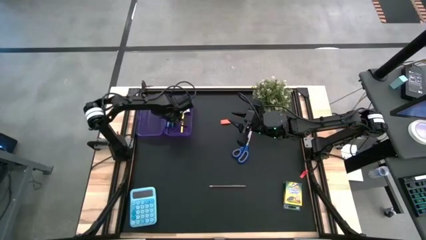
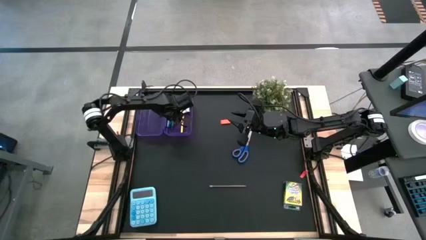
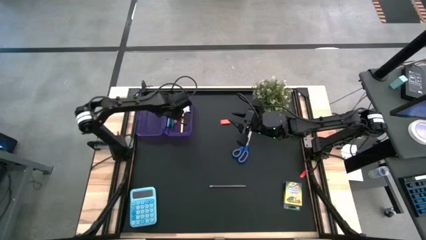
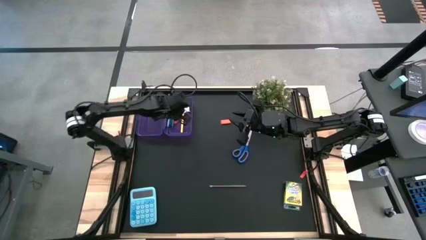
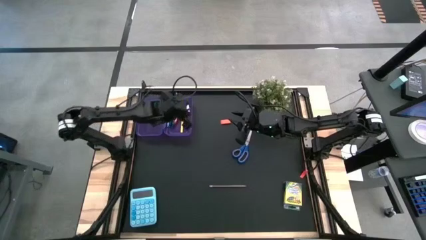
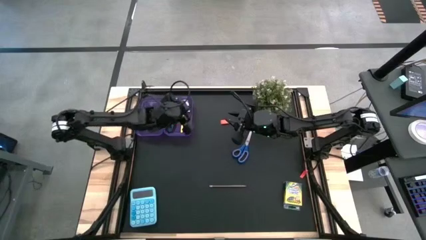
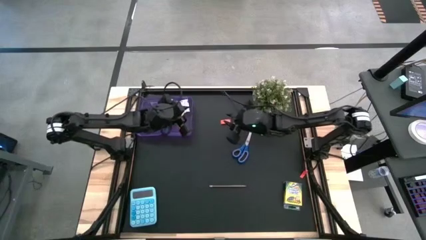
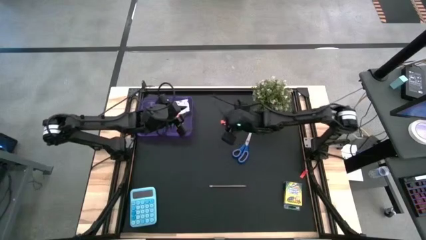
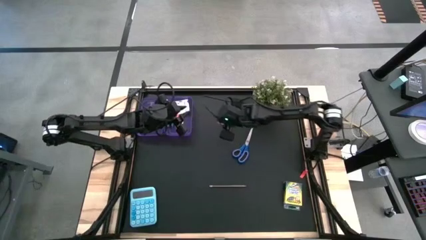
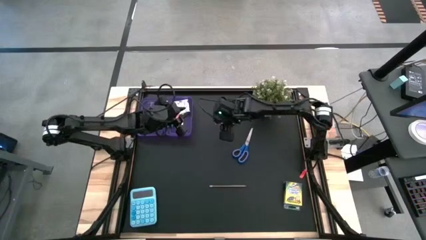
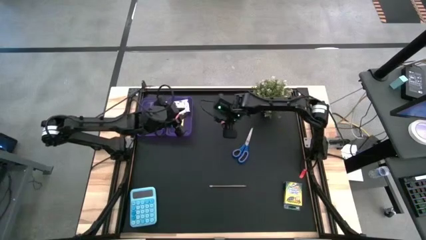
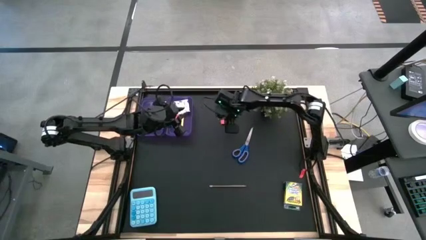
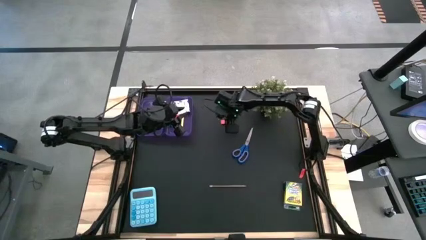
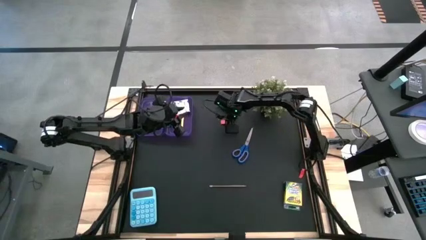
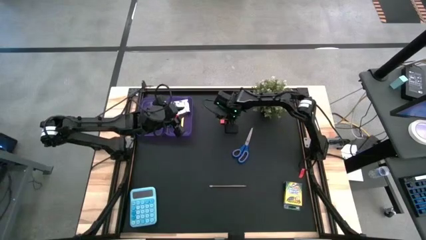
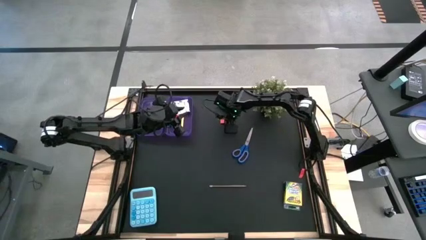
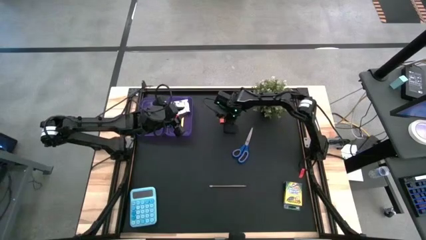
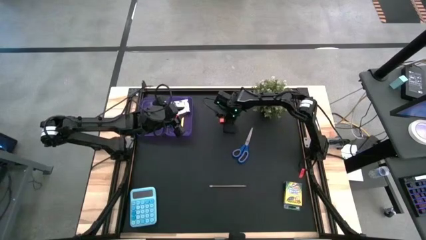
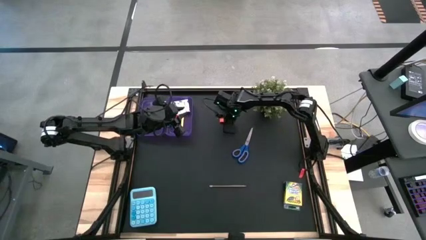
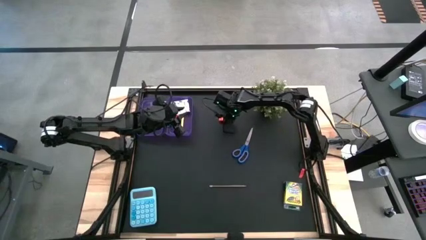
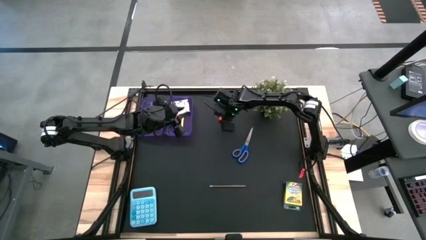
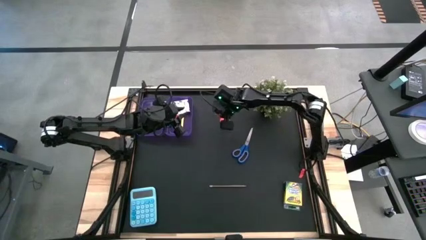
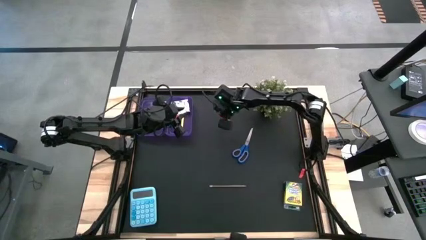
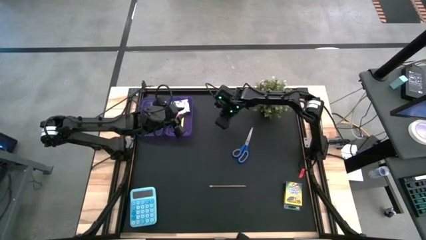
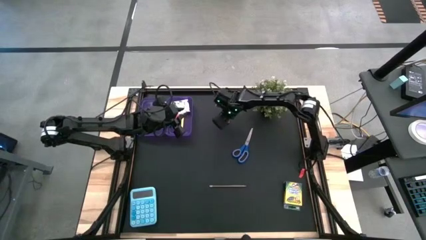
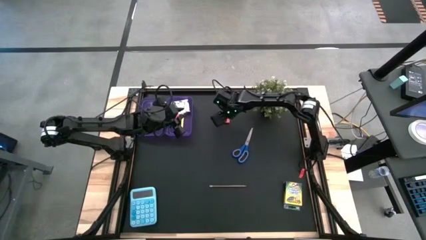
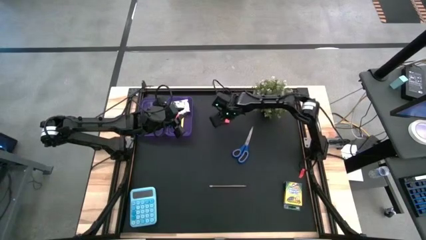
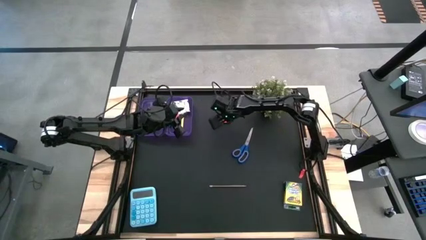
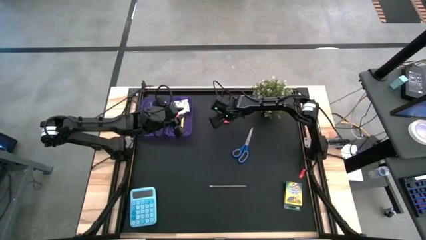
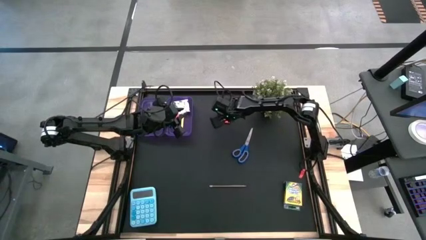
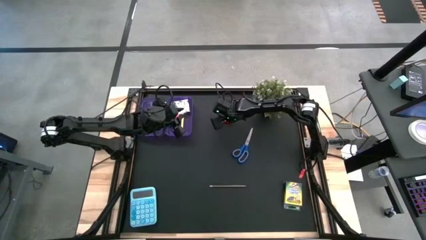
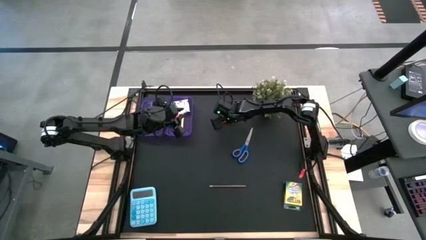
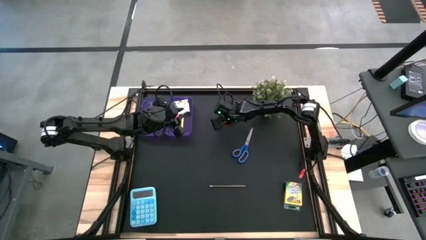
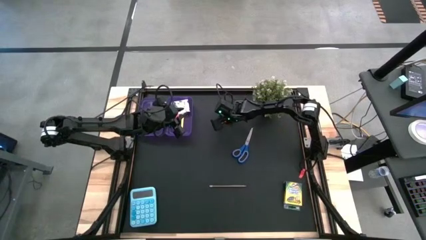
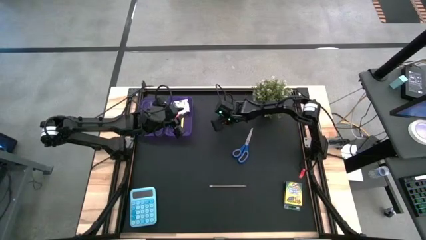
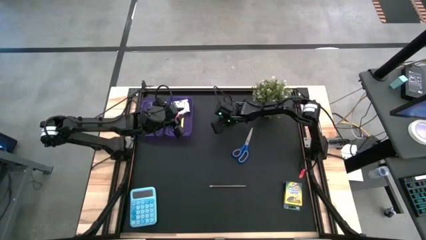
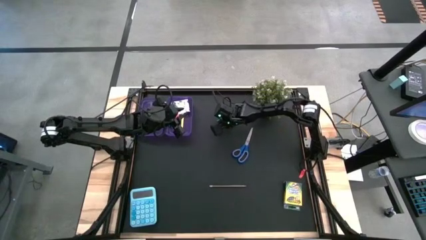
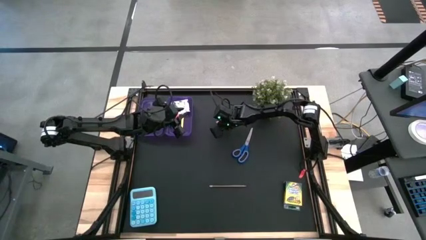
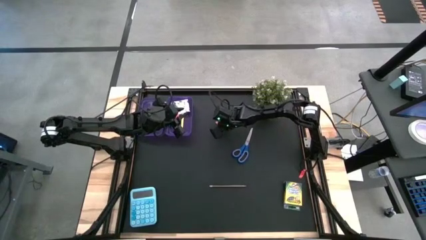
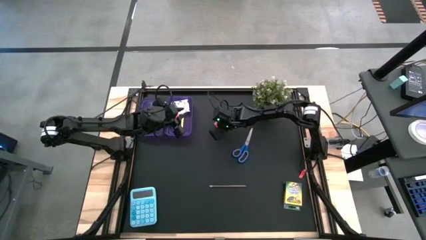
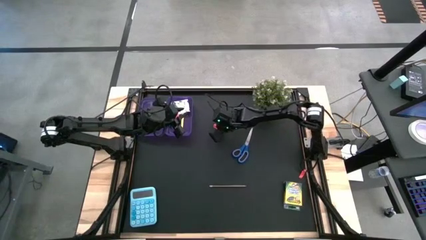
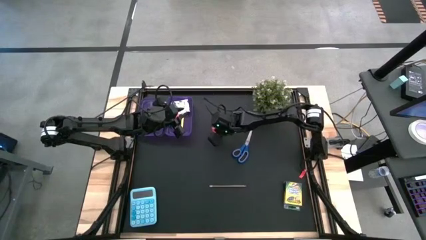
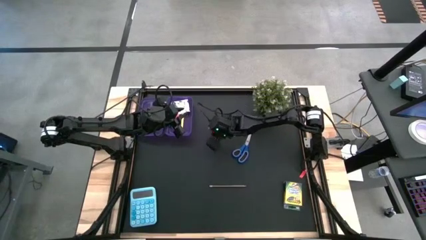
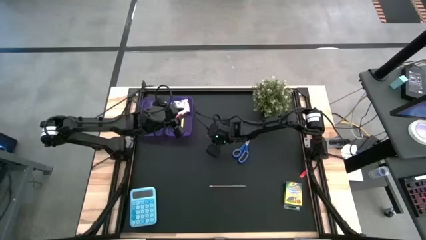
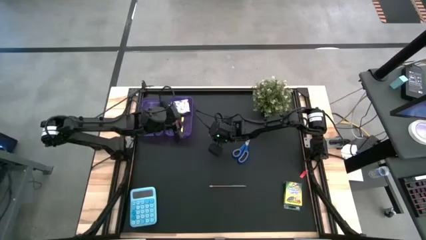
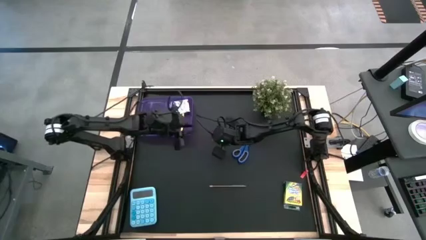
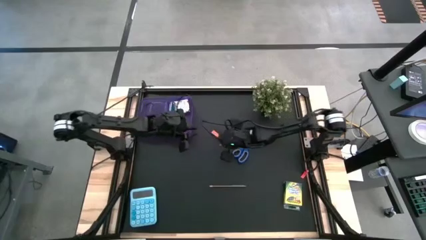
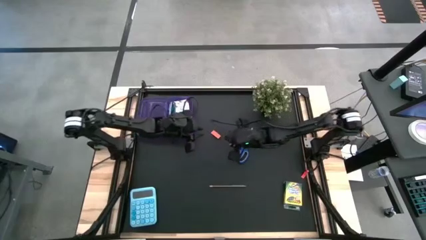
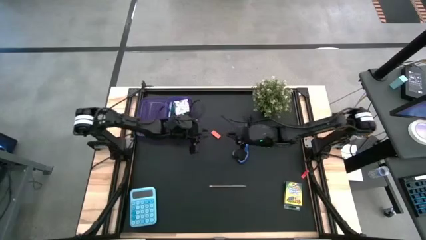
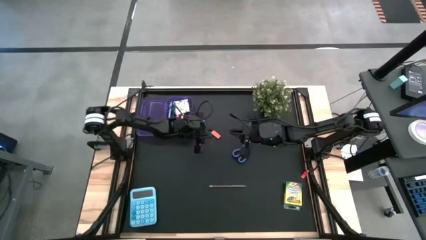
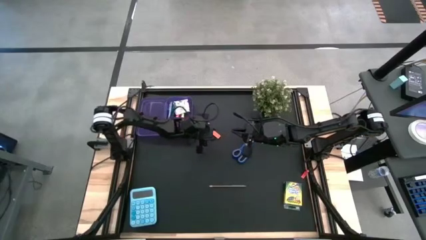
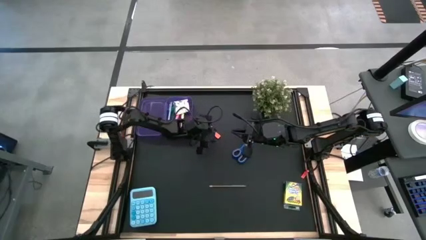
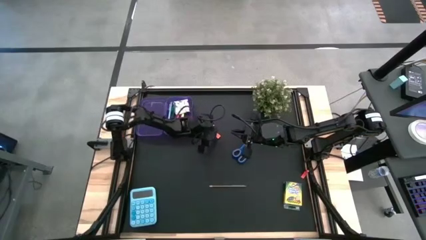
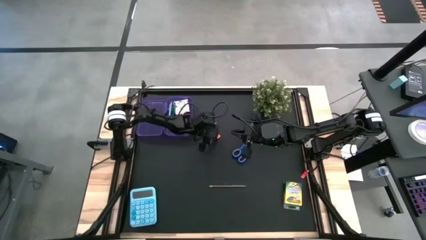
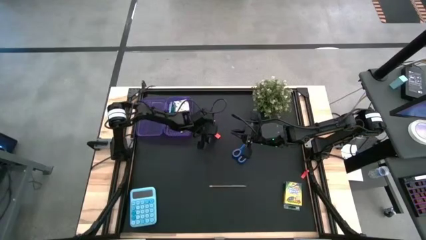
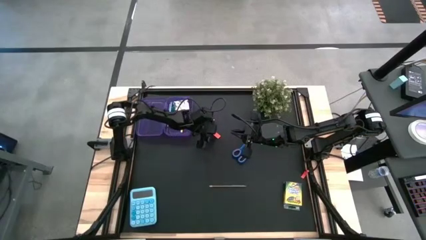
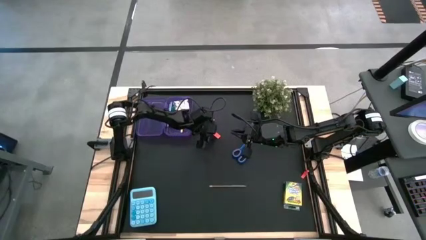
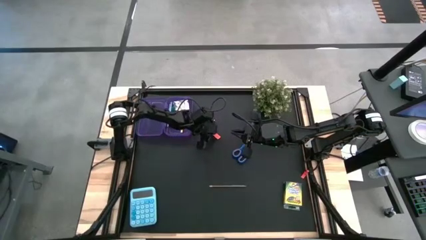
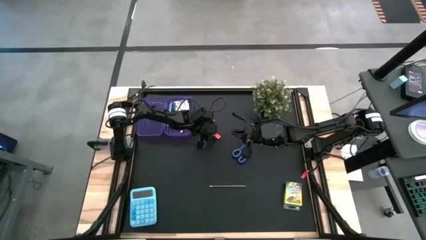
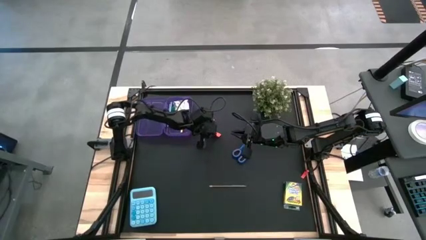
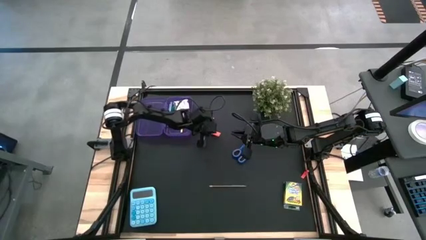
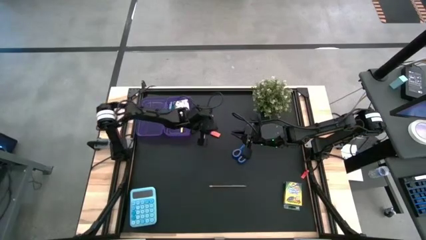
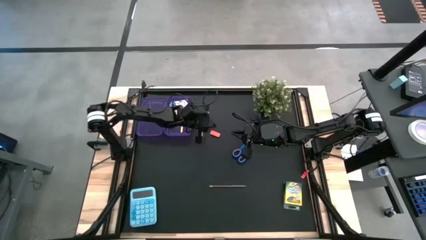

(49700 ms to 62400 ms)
Task: Pack school essentials
Put the orange eraser into the purple box

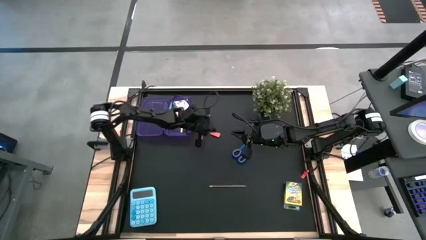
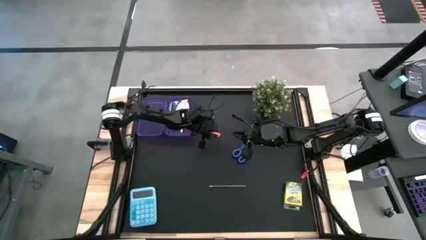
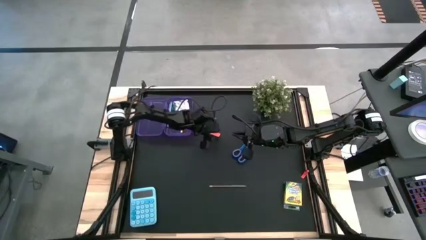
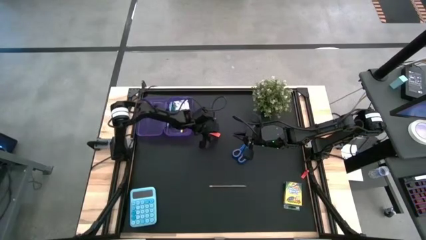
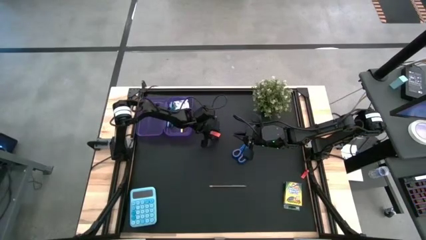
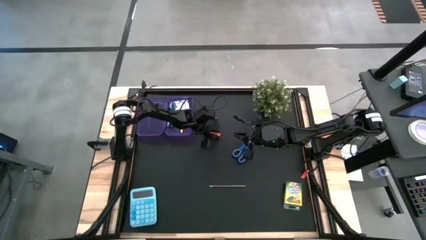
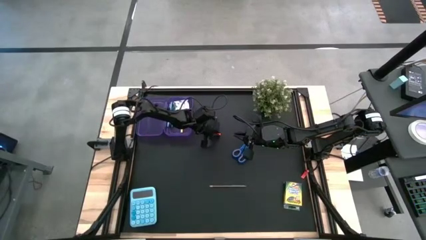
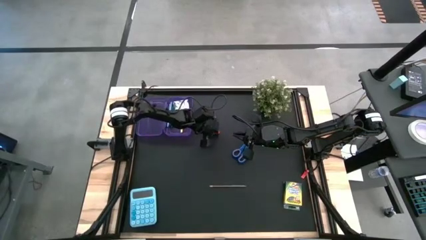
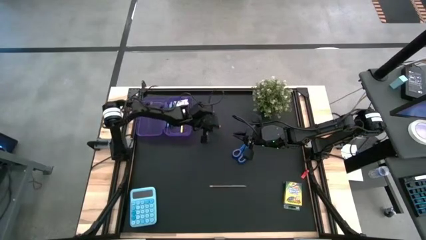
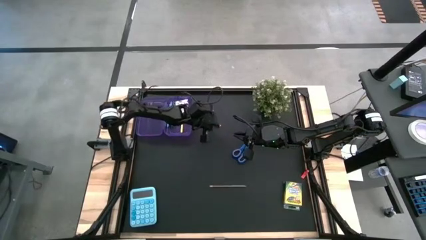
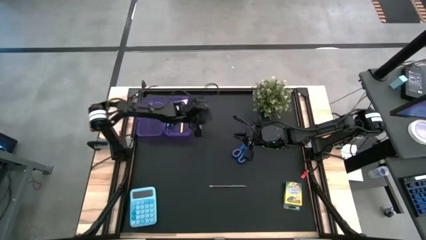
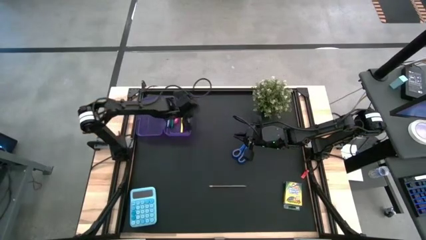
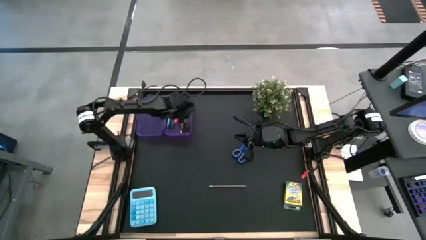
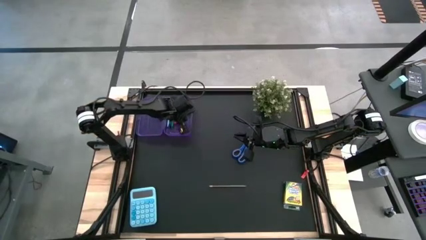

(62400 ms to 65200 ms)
Put the orange eraser into the purple box
